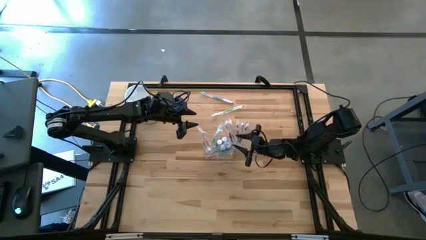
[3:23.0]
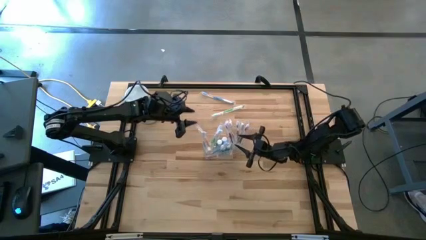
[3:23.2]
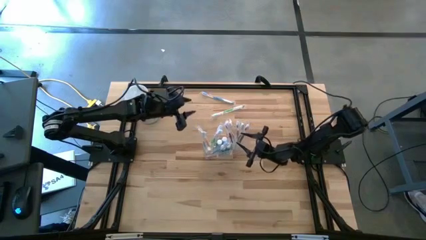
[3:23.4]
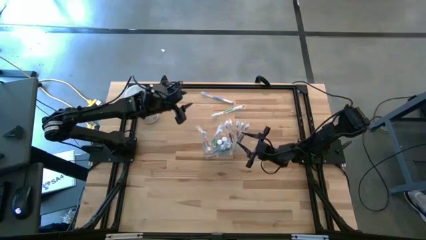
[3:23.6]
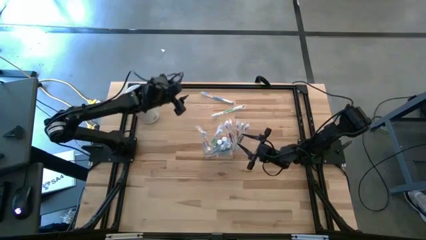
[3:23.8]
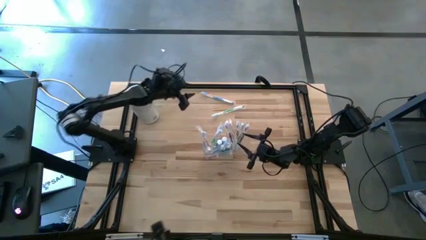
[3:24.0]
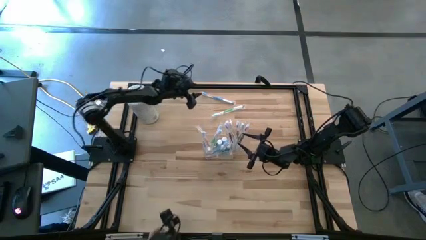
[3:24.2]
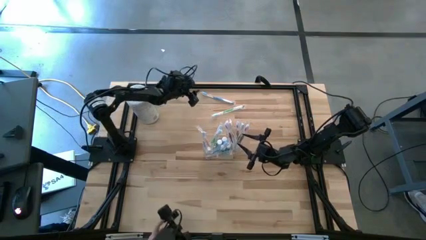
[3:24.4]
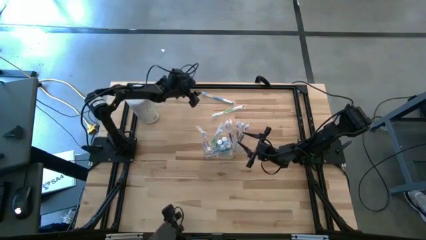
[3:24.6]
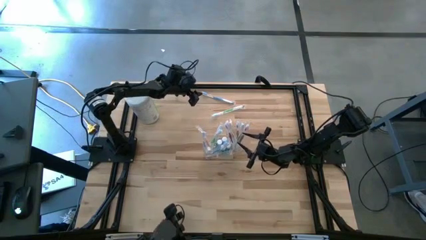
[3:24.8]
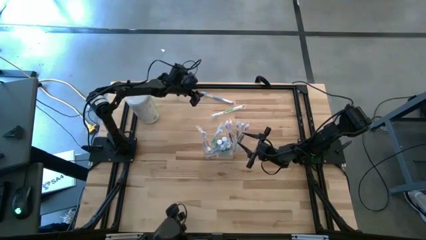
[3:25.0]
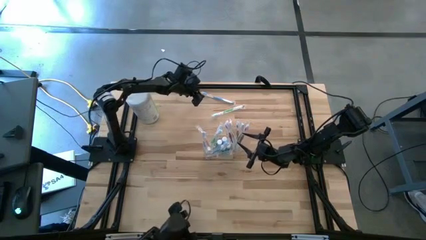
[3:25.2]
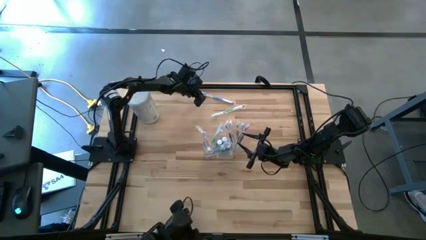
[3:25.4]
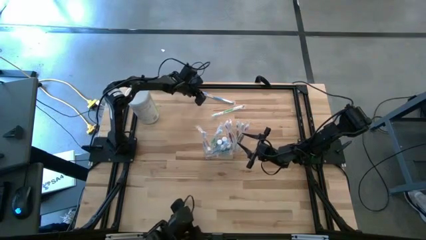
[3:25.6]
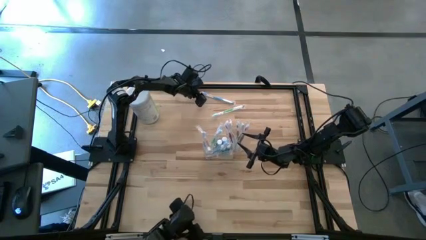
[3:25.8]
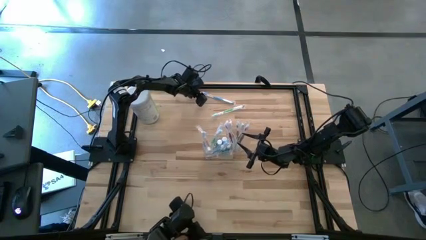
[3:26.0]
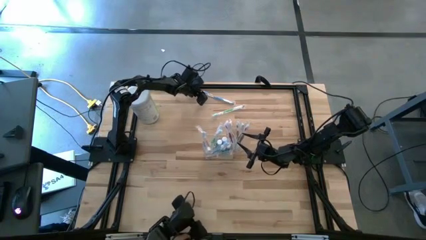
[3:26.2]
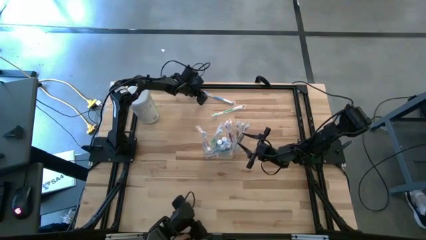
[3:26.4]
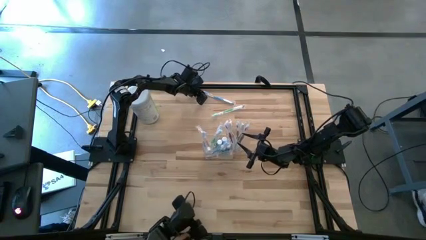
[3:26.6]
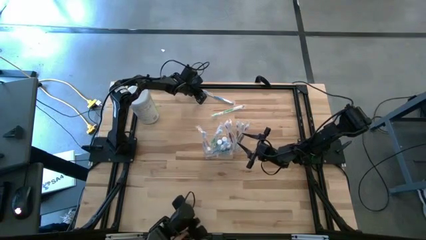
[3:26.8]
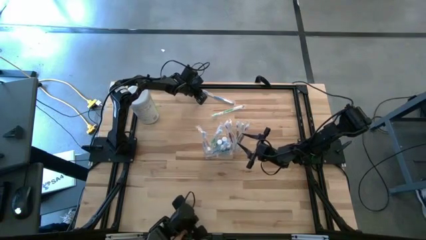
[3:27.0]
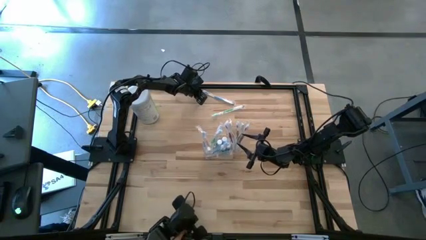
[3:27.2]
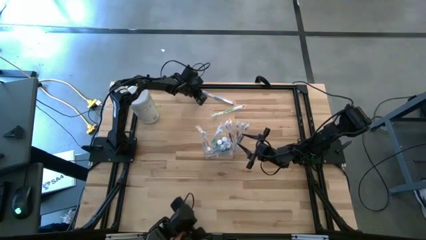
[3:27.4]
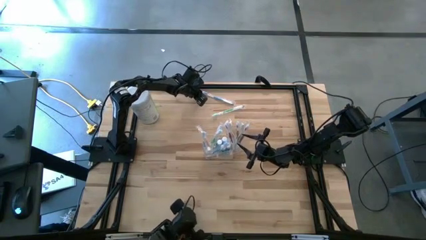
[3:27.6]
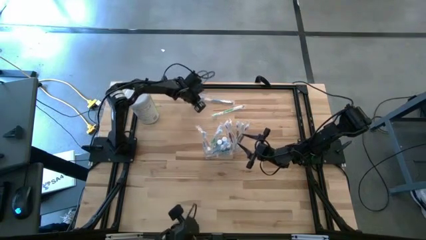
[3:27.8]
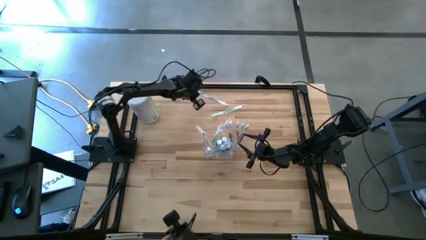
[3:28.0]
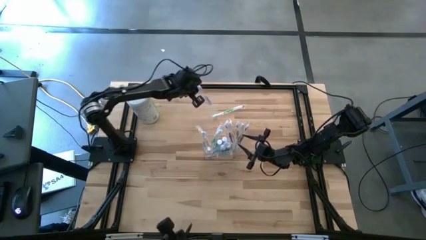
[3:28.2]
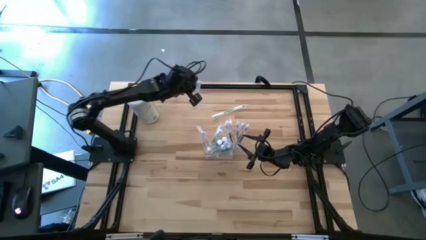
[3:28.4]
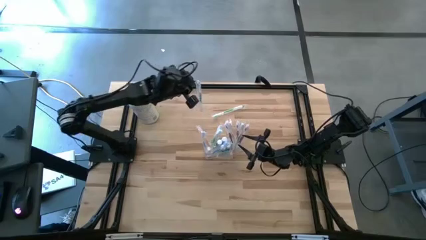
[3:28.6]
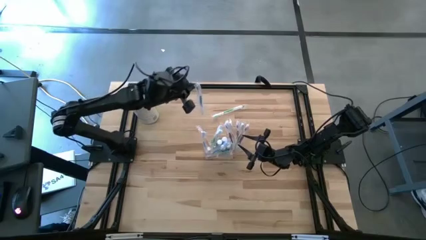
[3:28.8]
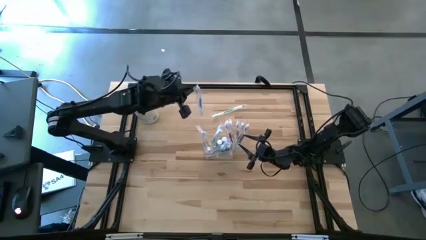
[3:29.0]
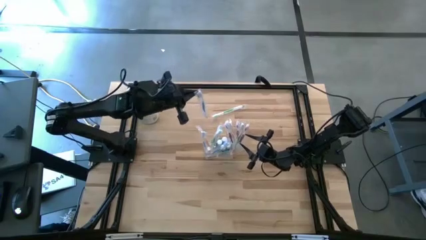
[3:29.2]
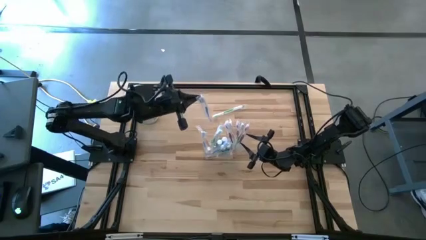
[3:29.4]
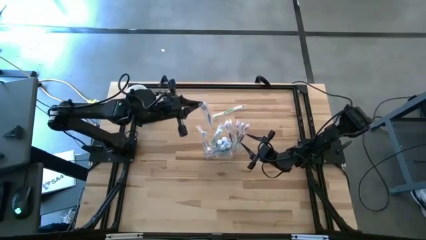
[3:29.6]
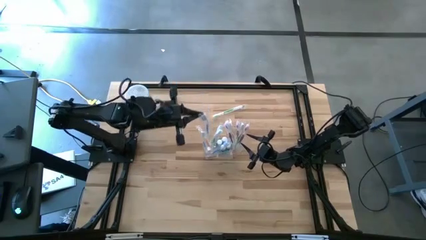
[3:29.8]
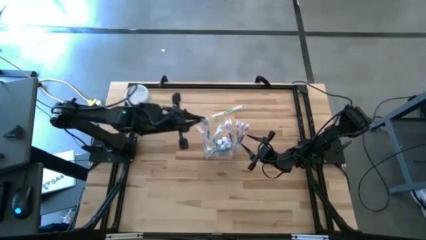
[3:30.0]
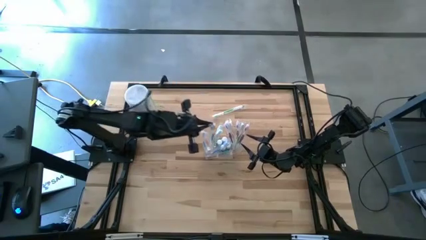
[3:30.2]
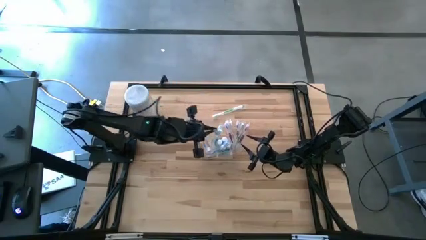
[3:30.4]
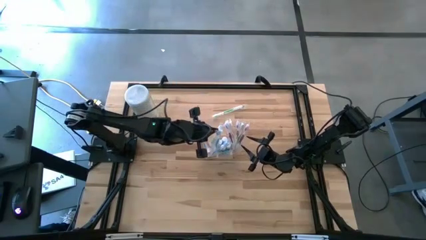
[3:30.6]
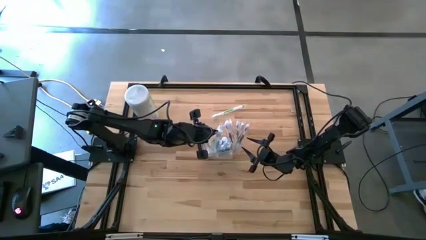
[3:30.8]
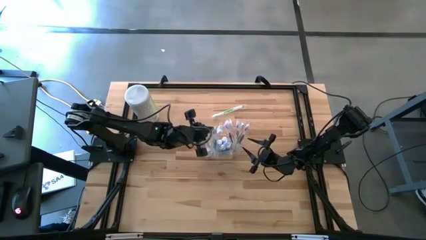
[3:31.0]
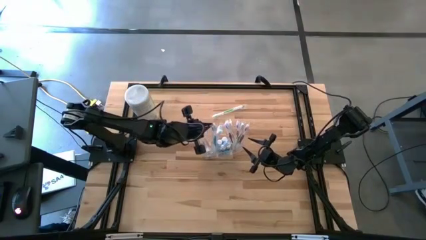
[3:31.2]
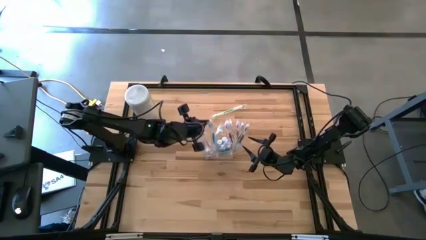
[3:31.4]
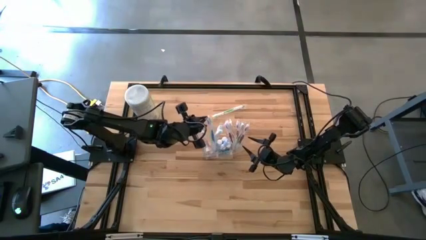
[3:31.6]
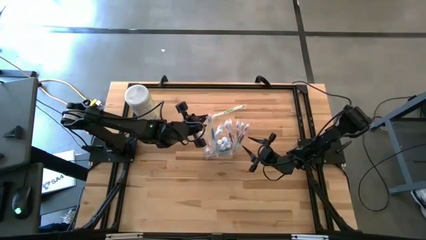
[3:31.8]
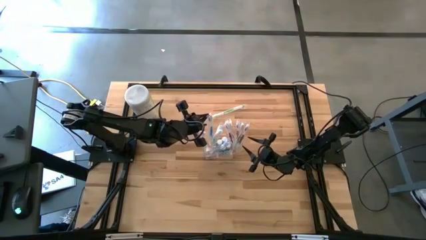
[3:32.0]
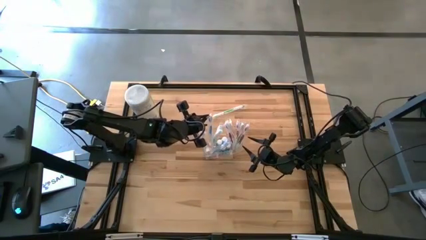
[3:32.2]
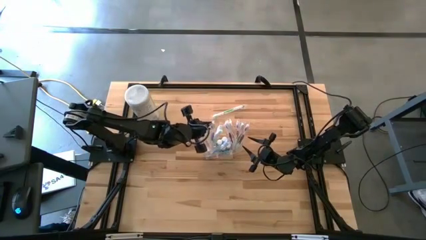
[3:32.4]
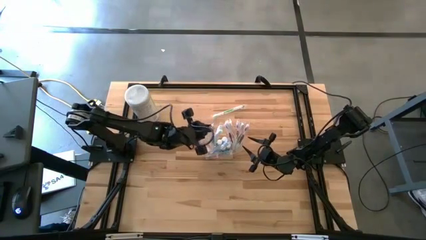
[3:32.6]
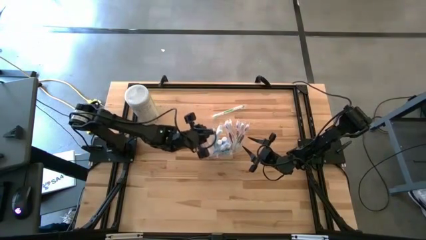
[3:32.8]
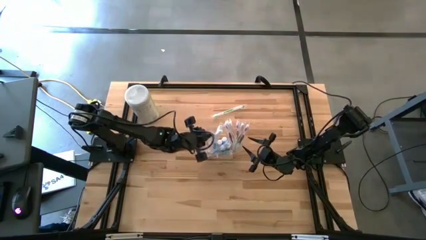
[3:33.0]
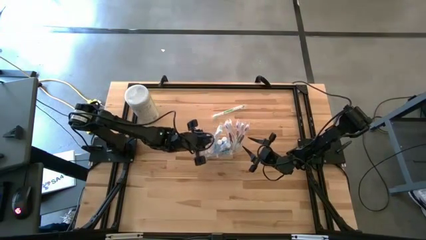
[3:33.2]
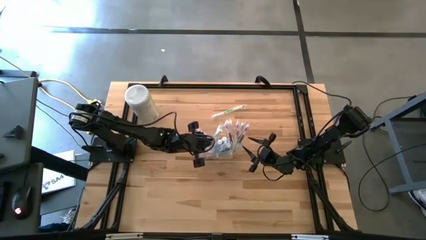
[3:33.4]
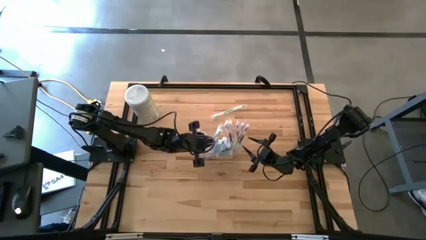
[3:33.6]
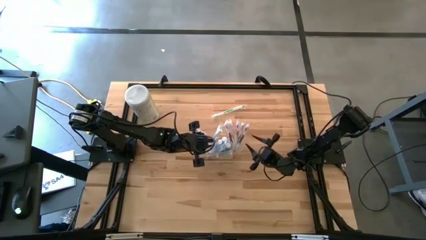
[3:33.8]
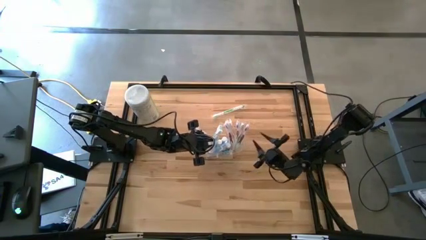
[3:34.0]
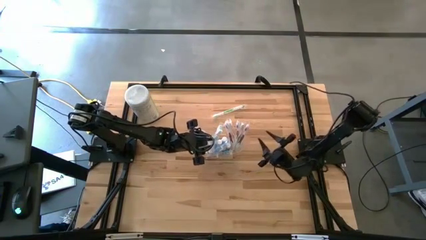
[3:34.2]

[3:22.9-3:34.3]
Task: Pick & Place toothbrushing station
Put the blue toothbrush into the transparent organizer

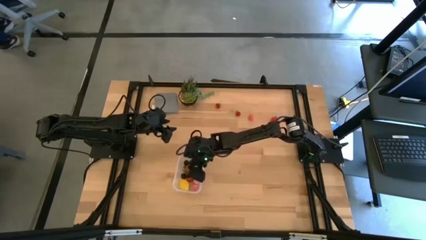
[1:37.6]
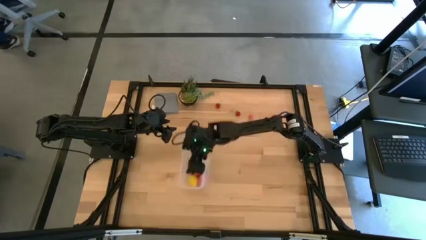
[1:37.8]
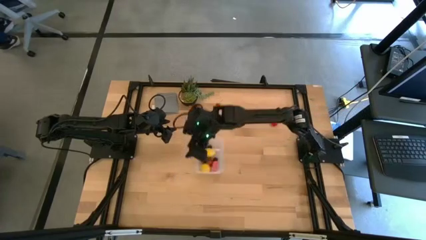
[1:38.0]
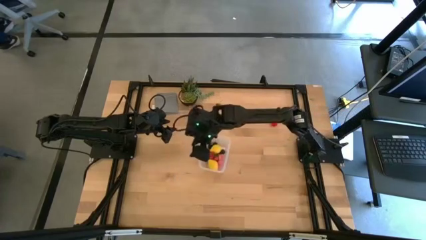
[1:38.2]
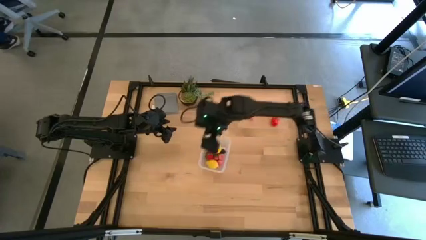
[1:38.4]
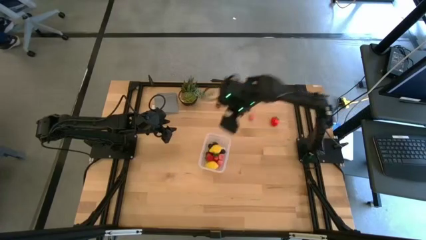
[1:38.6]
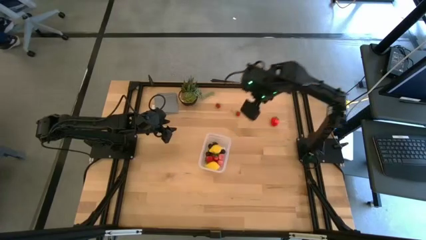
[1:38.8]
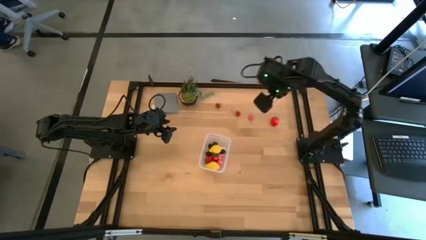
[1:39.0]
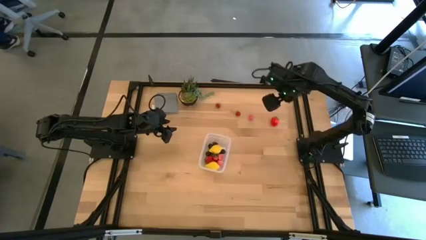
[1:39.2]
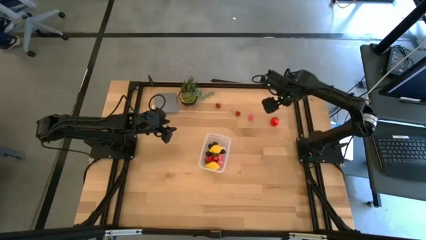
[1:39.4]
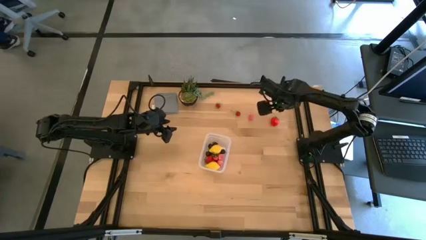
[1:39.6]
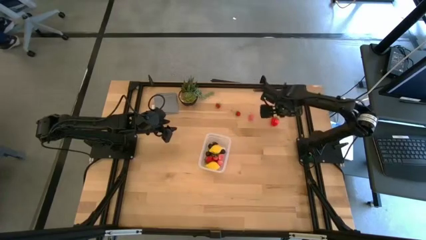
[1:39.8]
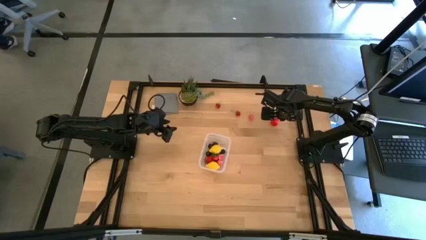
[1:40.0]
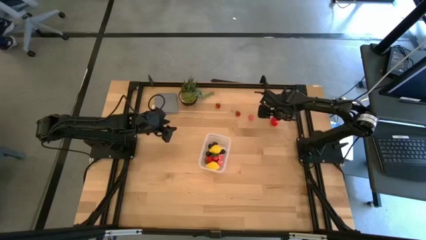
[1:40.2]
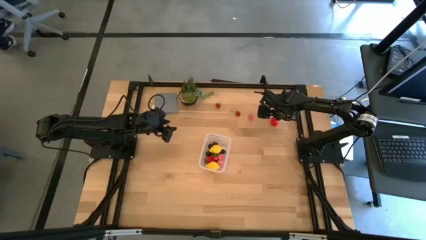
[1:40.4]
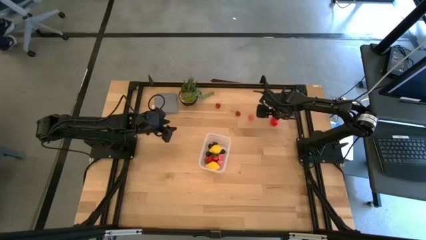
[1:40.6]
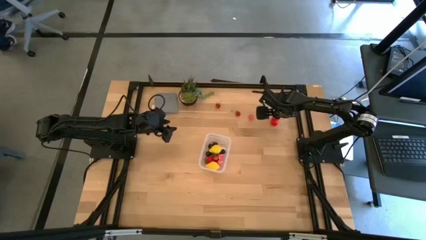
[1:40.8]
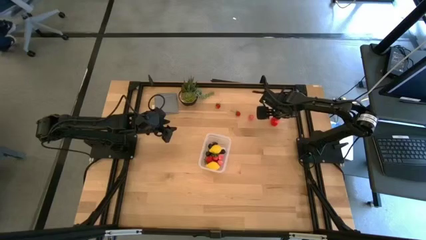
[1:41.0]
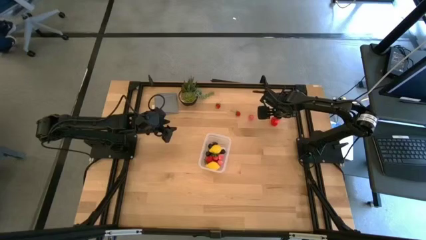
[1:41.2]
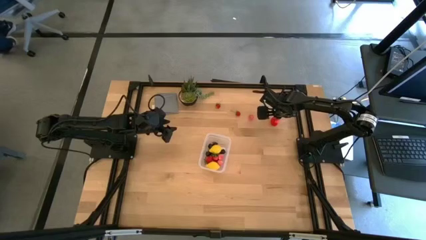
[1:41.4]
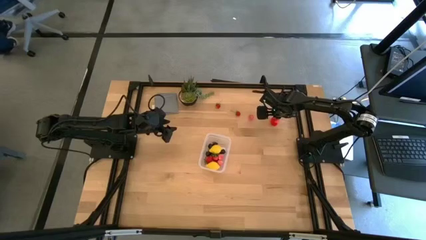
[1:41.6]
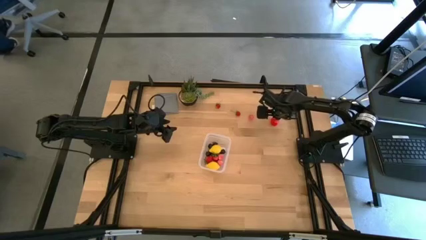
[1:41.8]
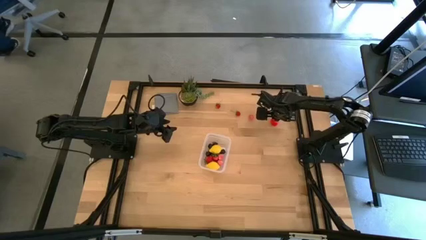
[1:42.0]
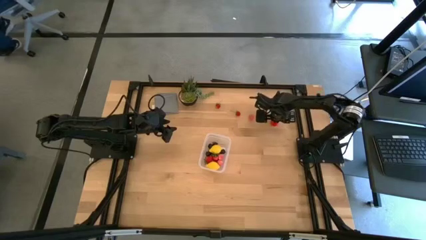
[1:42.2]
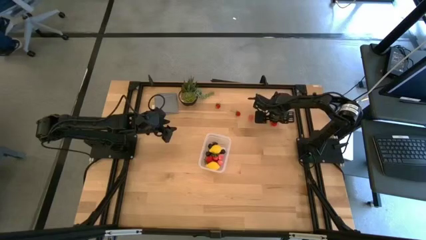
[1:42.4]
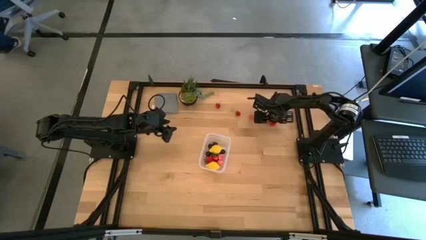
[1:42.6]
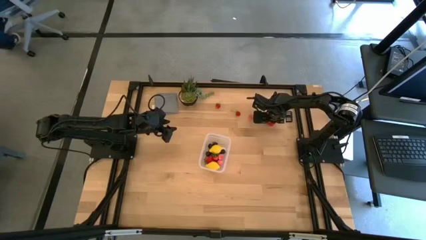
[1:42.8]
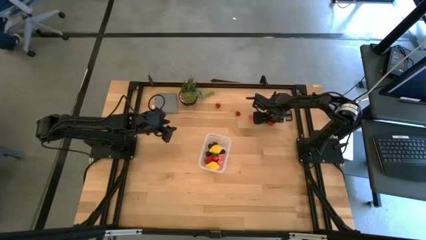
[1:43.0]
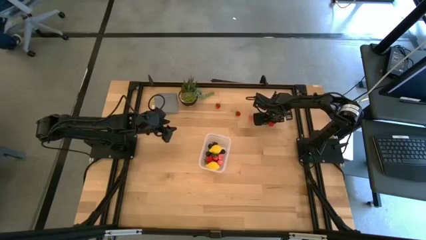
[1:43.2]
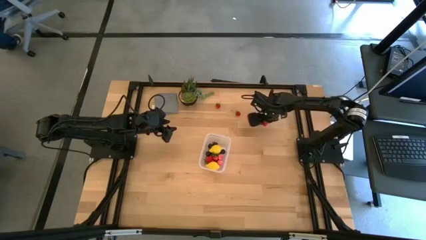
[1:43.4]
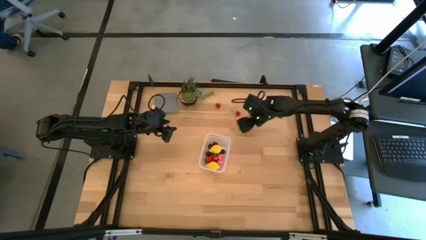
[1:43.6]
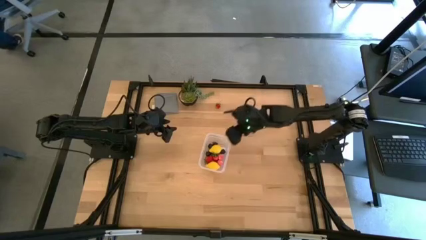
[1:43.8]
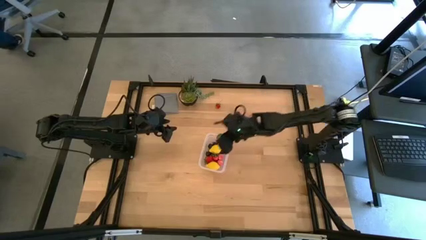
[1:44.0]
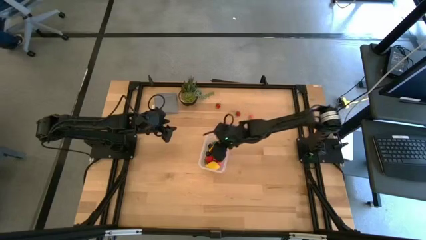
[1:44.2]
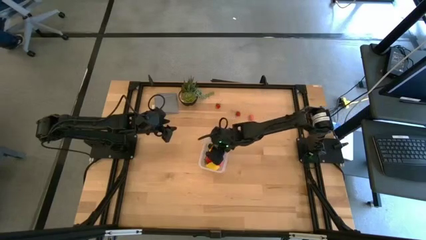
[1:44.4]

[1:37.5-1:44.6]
Task: Pick and placing Produce into tupperware
Put the red strawberry into the transparent bin
